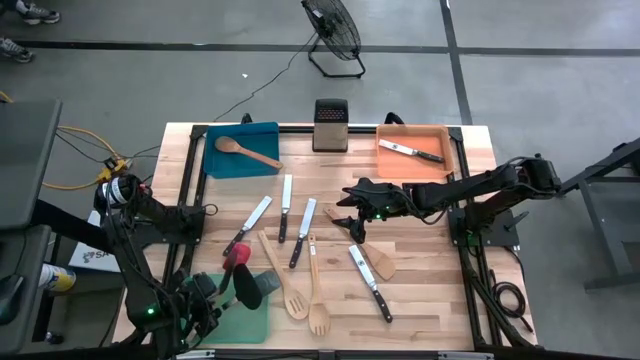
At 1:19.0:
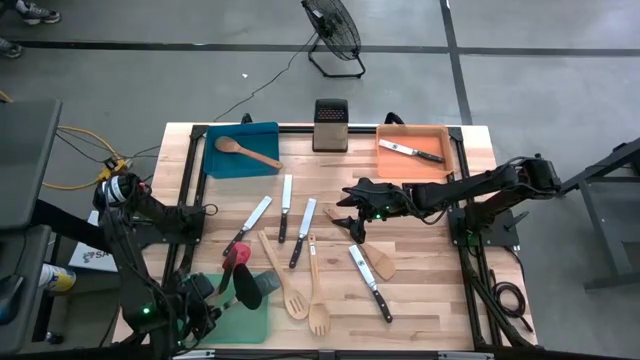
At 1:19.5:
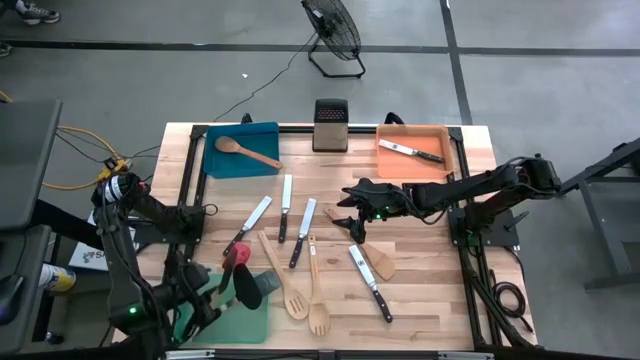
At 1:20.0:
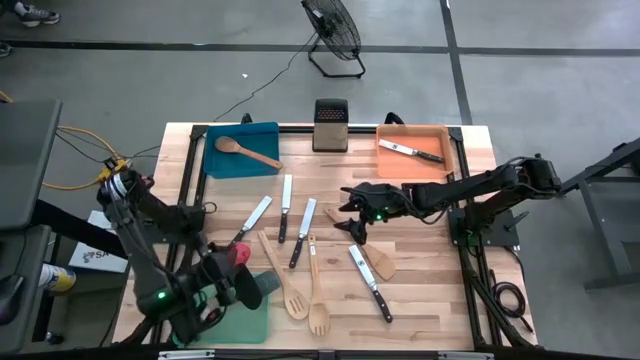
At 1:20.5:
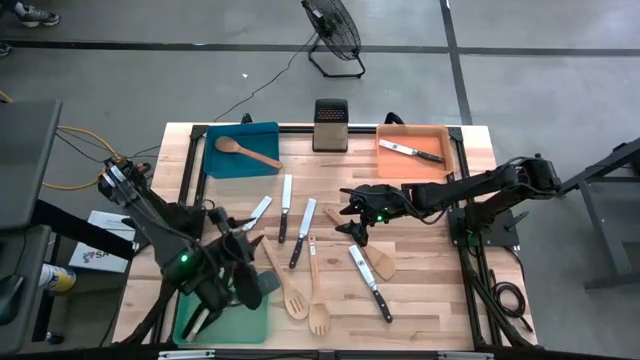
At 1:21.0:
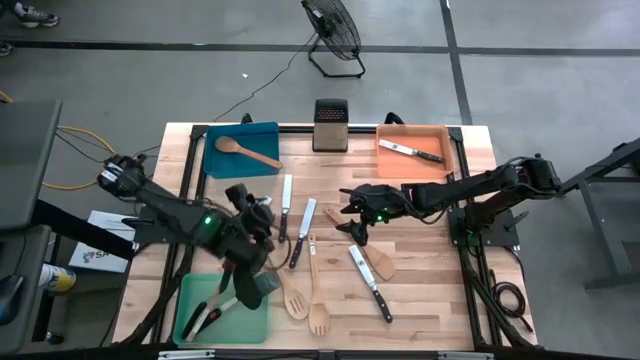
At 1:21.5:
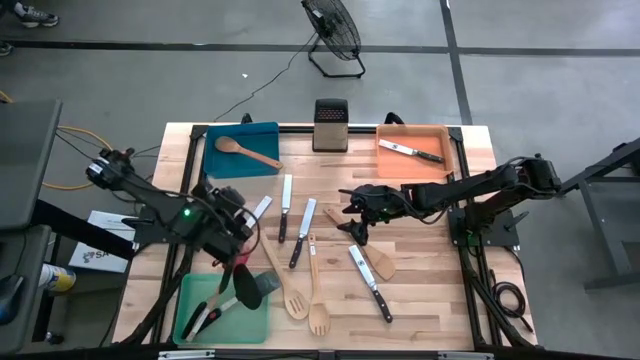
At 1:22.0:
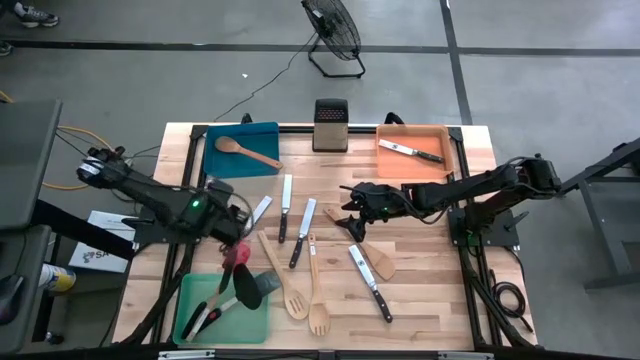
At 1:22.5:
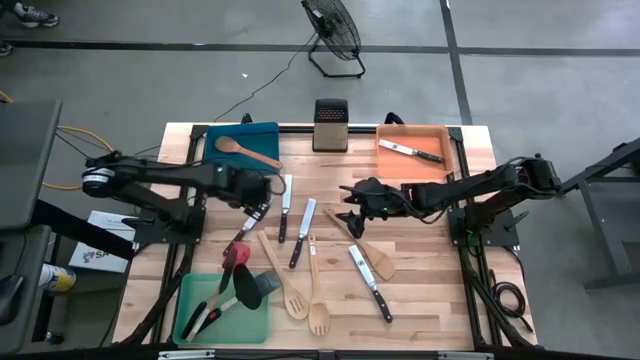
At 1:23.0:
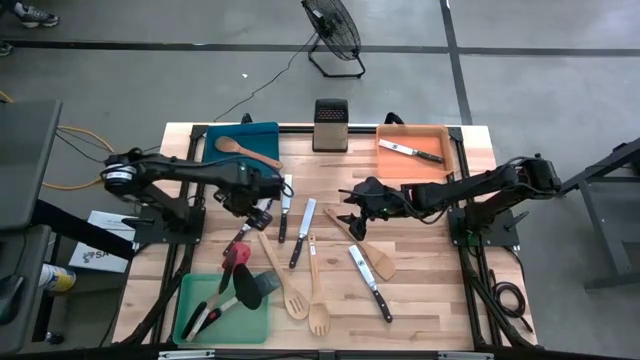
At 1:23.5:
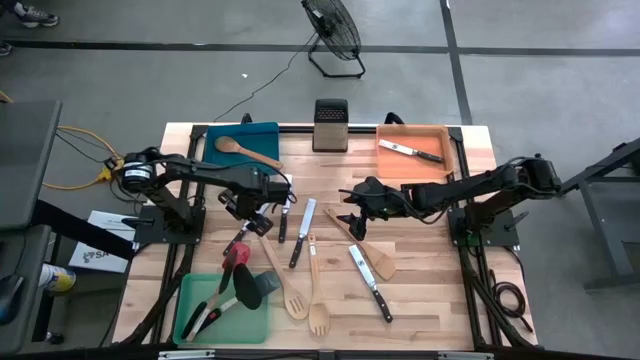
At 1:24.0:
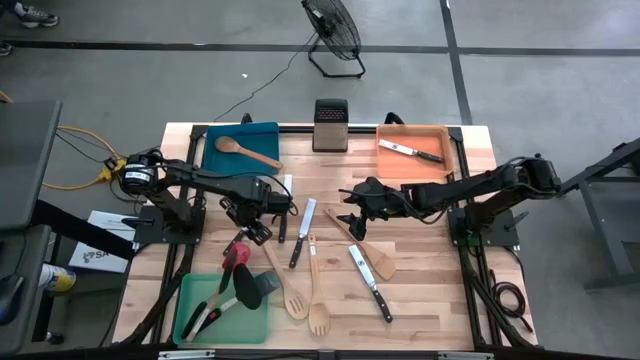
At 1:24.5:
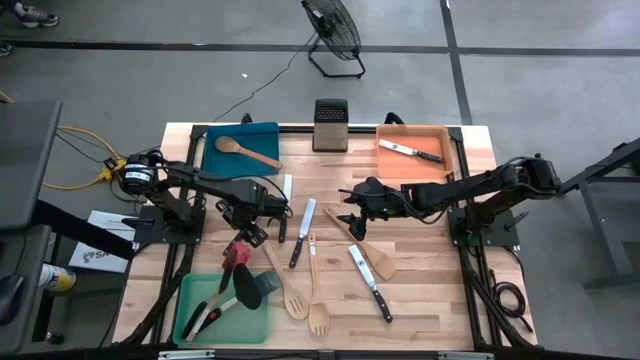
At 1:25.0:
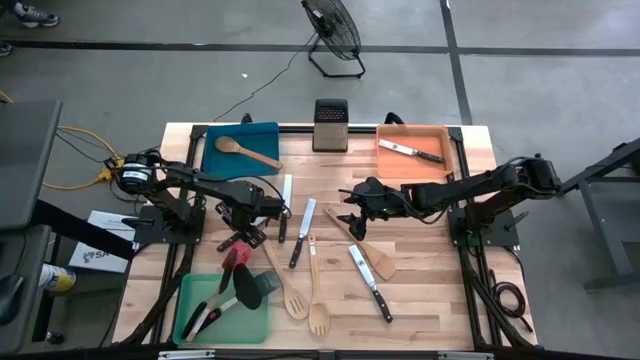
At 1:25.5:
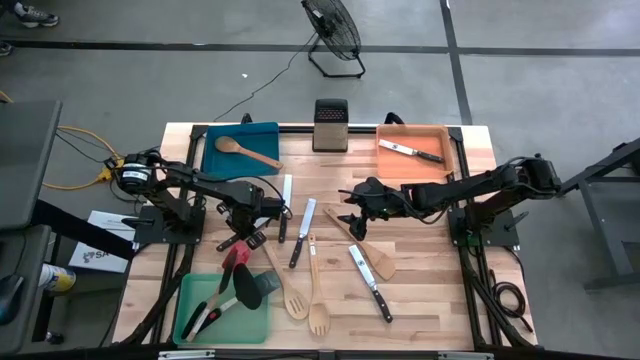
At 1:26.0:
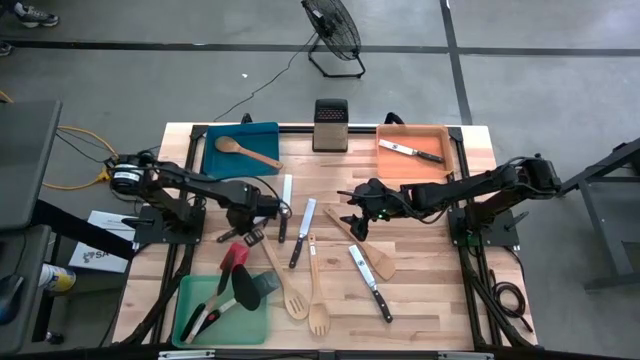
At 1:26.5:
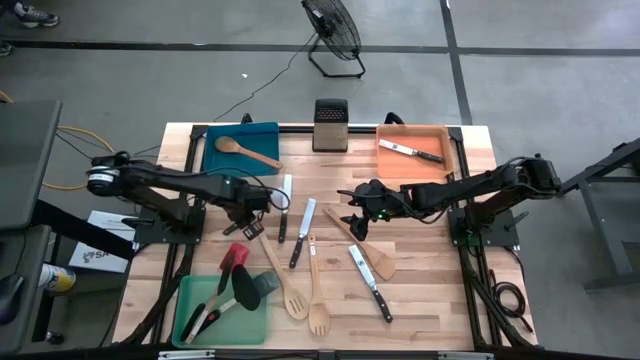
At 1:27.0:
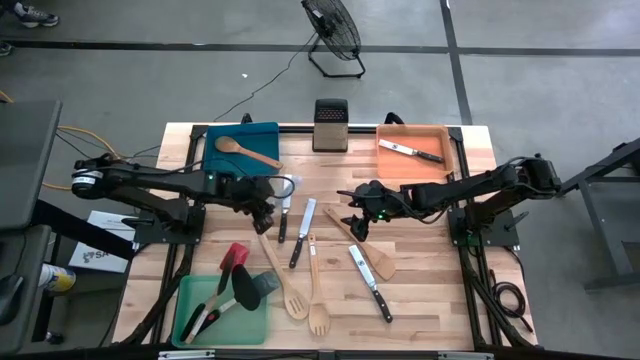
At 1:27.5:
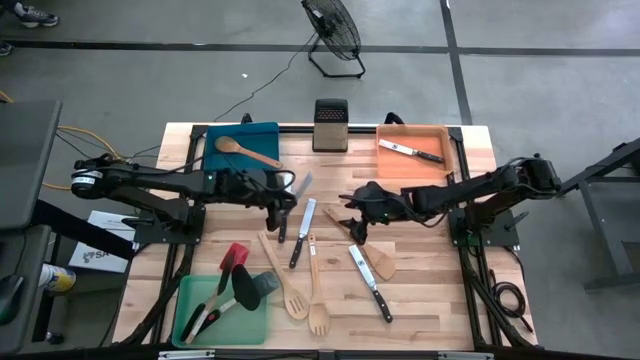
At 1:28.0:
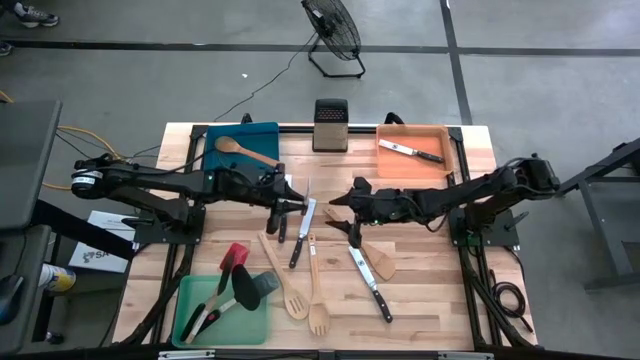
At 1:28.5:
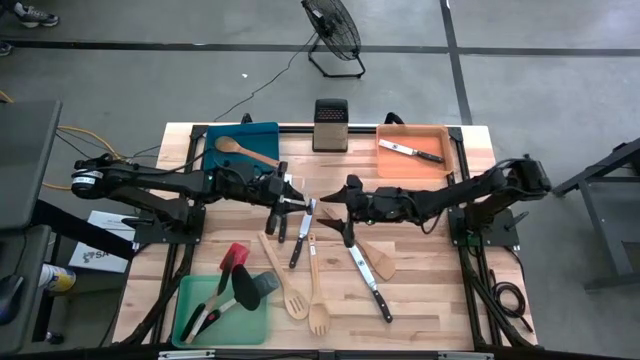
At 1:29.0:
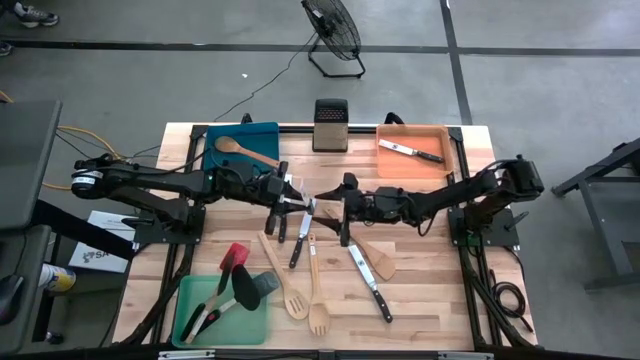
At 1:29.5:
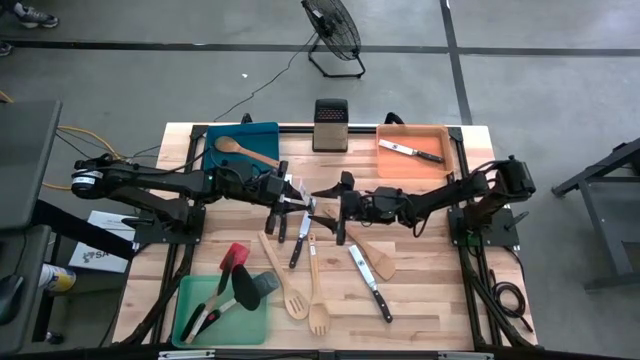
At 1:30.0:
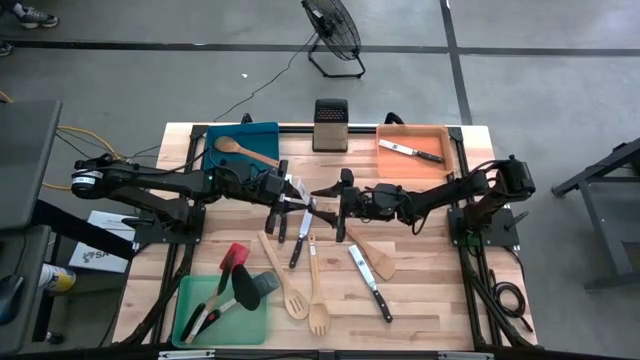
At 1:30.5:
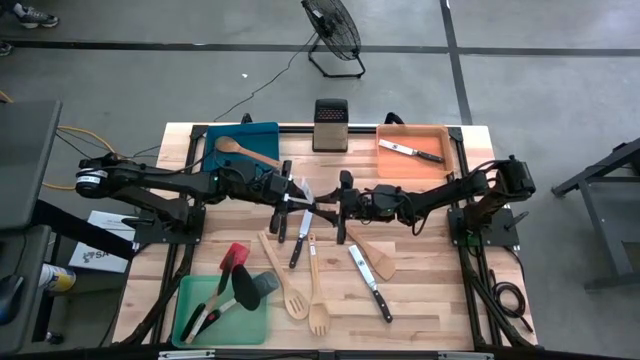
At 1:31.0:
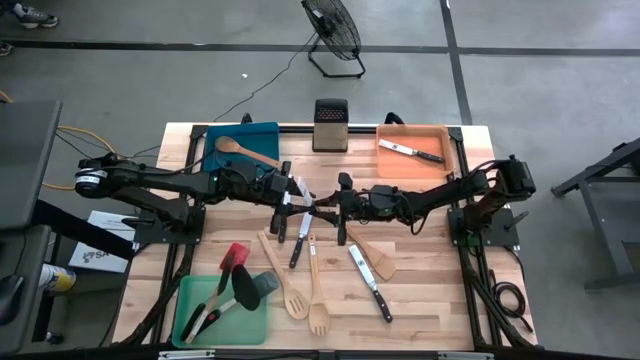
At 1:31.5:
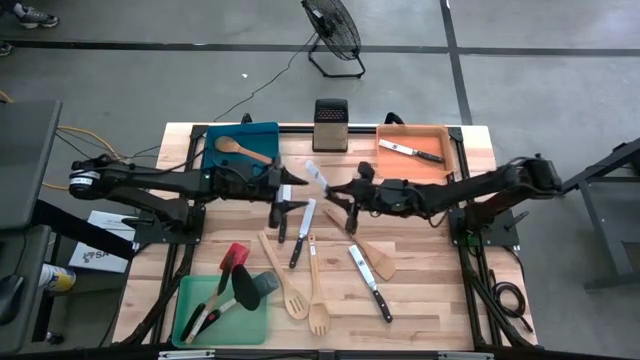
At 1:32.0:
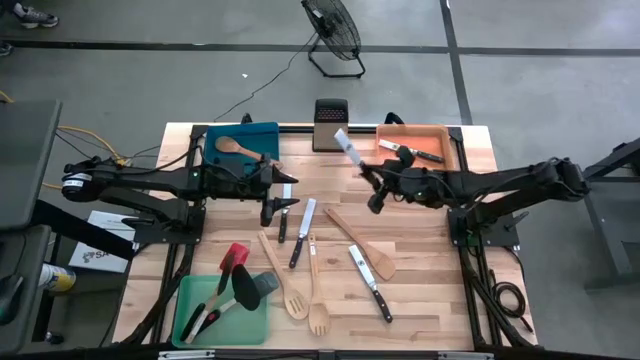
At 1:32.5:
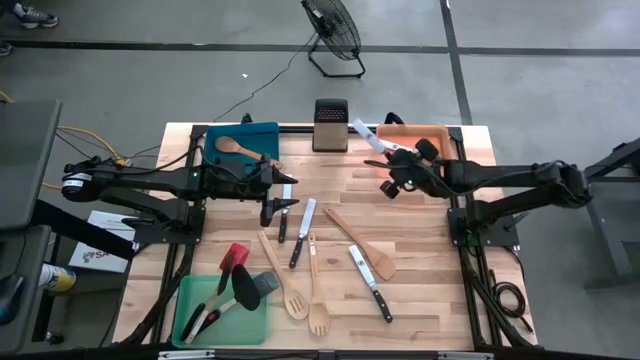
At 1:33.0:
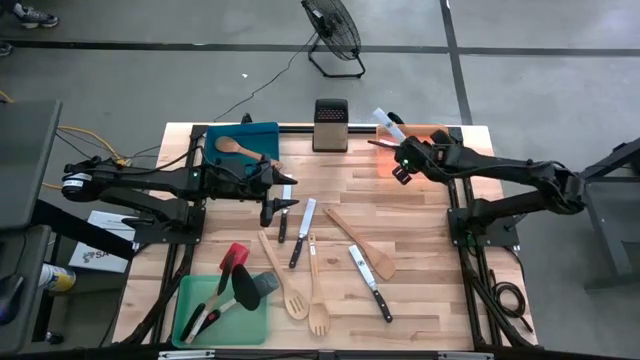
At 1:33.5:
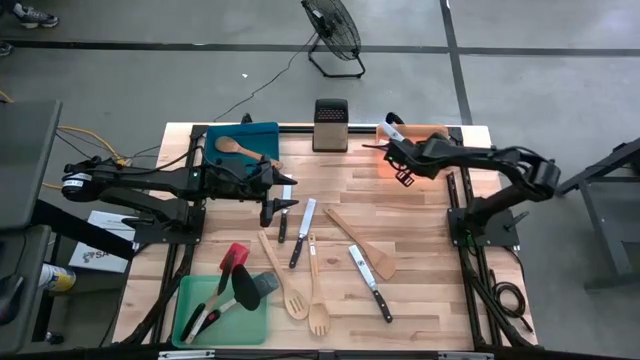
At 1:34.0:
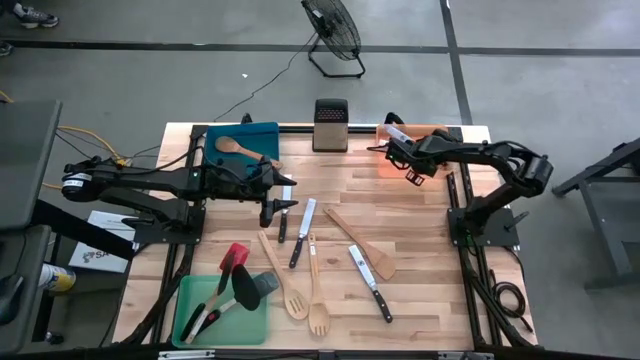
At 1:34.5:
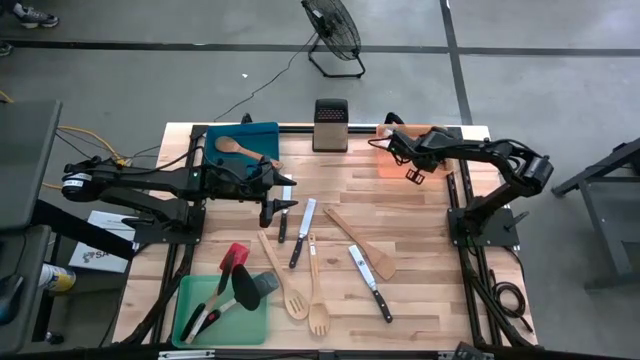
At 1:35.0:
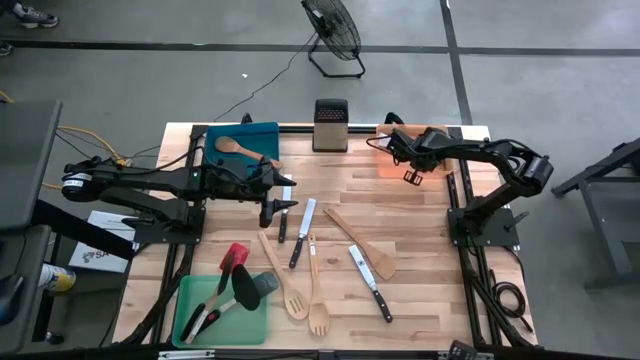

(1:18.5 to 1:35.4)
Task: Pick & Place Kitchen Items
Put the black spatula into the orange bin

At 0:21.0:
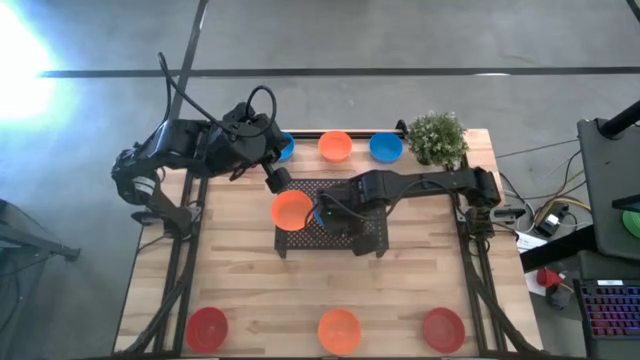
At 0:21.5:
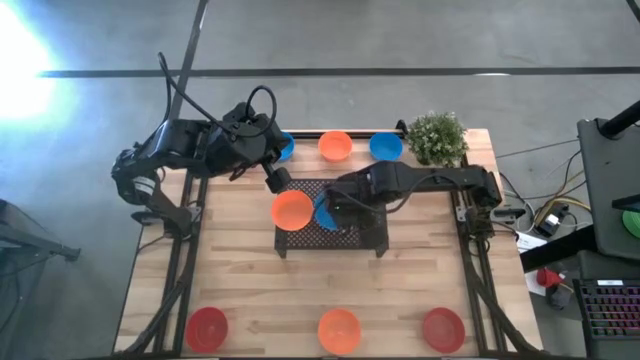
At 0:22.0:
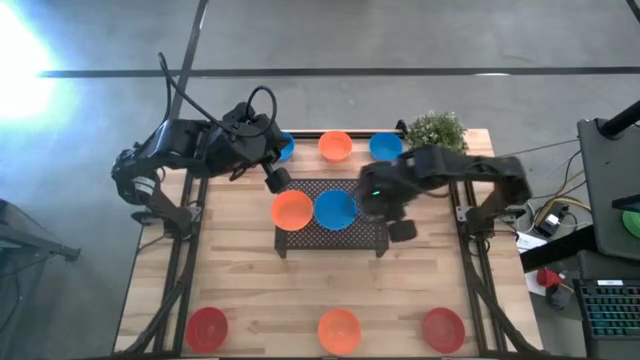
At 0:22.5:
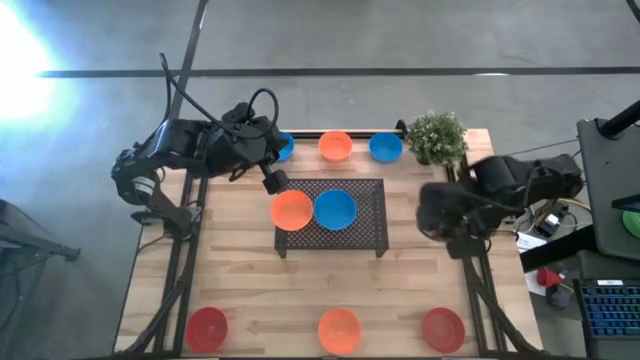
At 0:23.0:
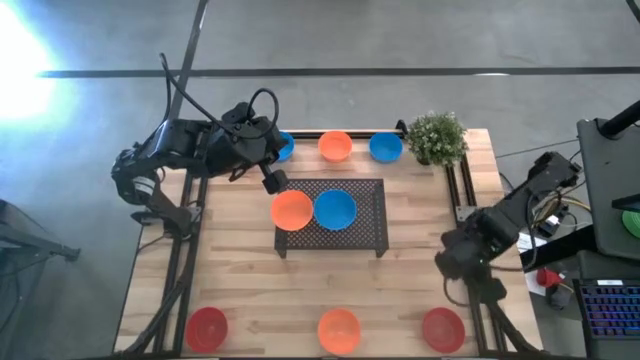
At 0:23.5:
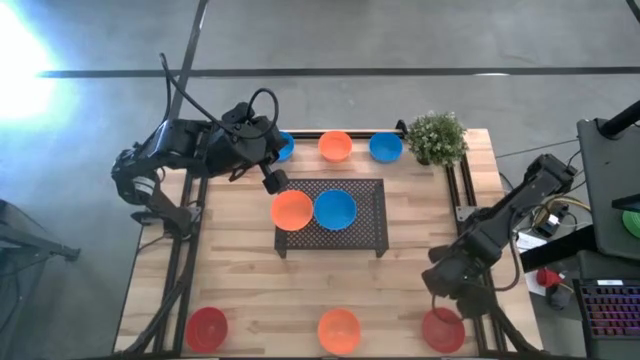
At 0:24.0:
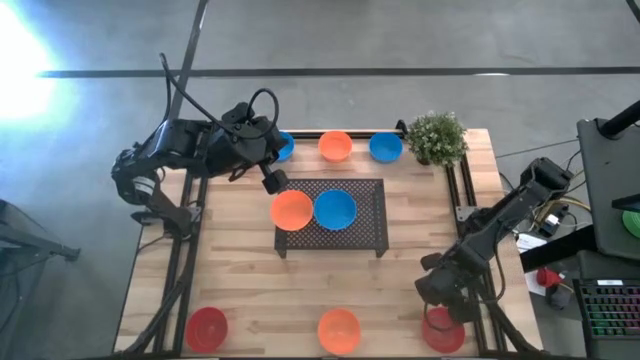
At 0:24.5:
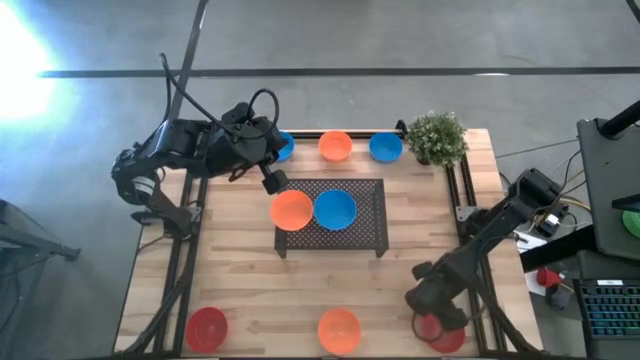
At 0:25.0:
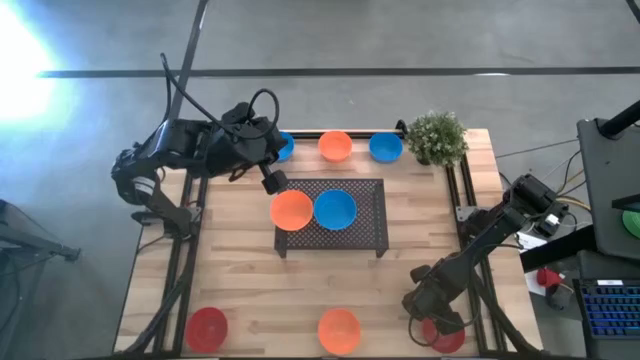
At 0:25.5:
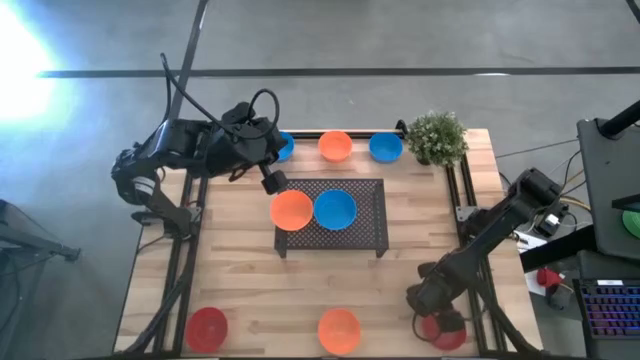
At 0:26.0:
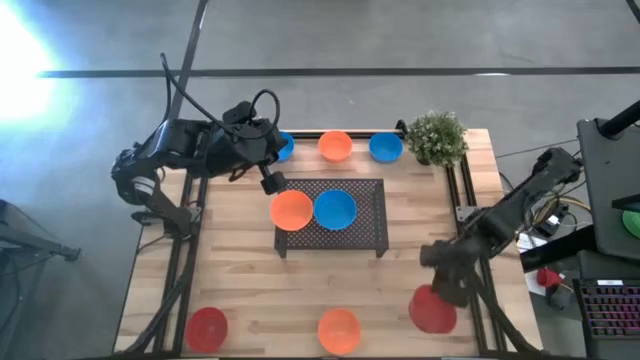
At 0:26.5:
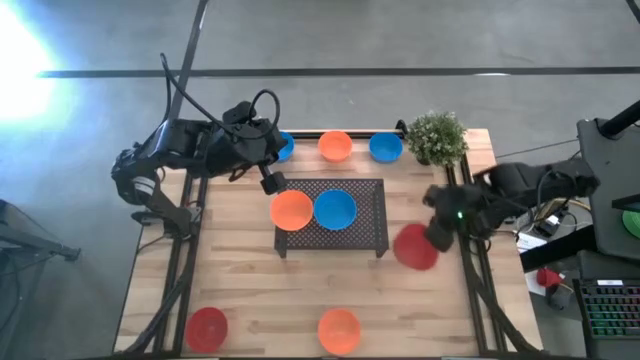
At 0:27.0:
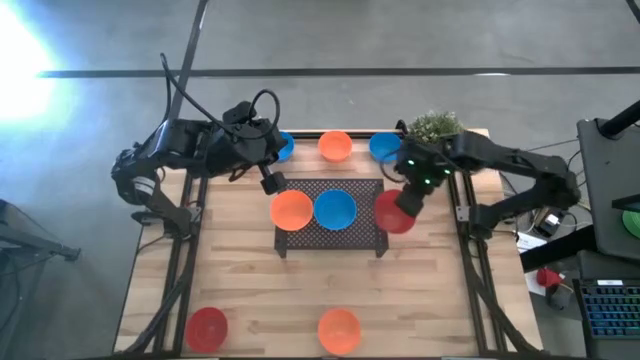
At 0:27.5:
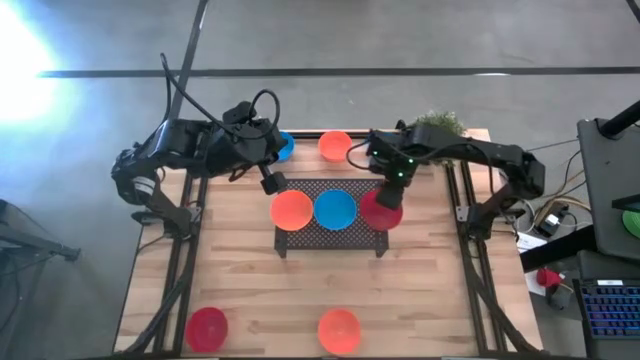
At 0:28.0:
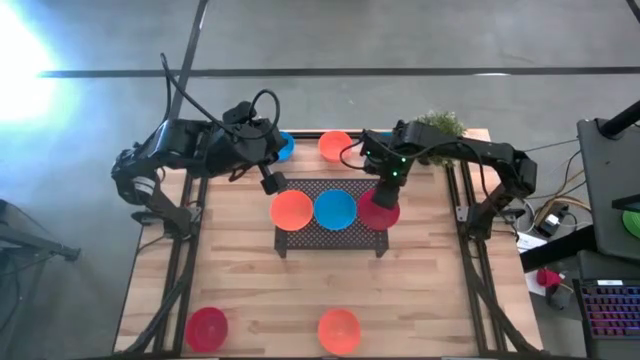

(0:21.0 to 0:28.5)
Task: Pick & Place Mini bowls
Put the right red bowl on the shelf
